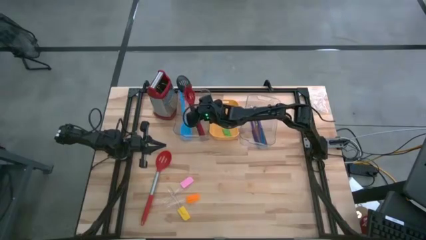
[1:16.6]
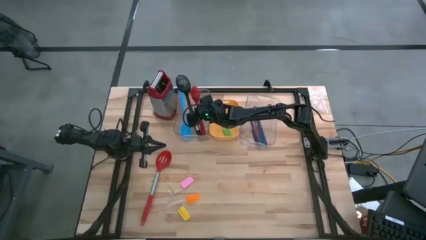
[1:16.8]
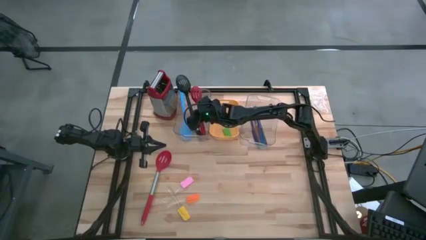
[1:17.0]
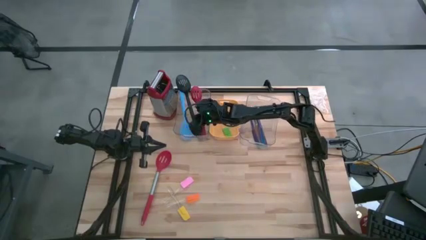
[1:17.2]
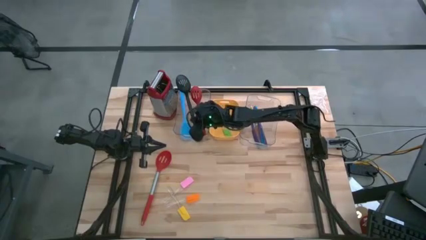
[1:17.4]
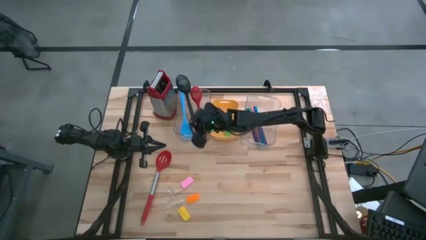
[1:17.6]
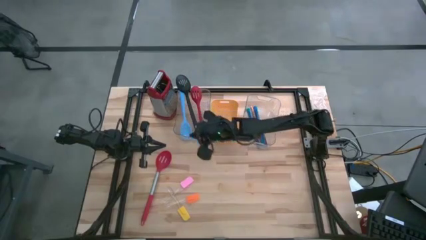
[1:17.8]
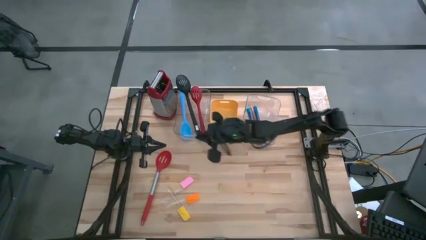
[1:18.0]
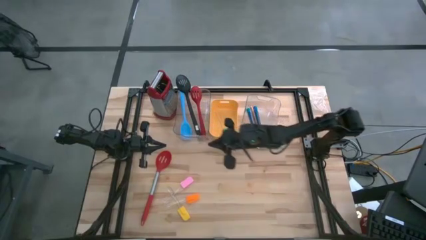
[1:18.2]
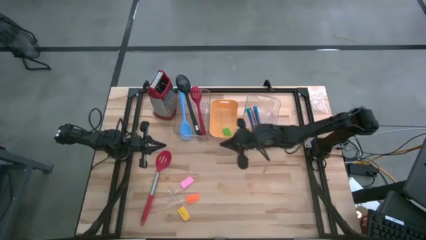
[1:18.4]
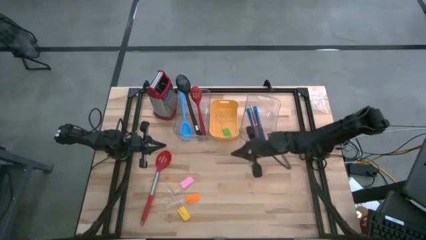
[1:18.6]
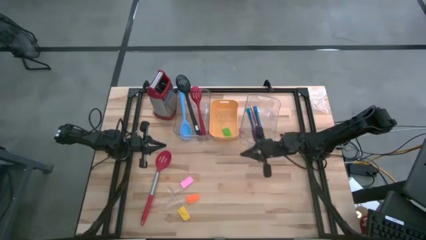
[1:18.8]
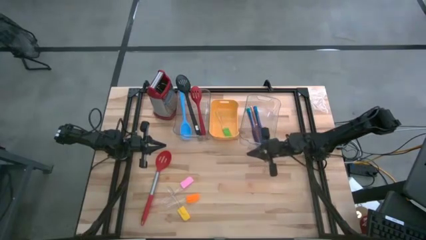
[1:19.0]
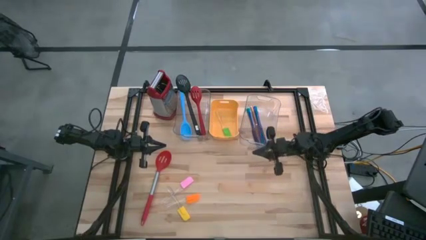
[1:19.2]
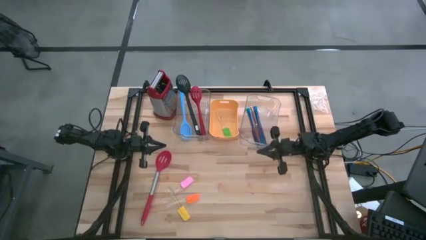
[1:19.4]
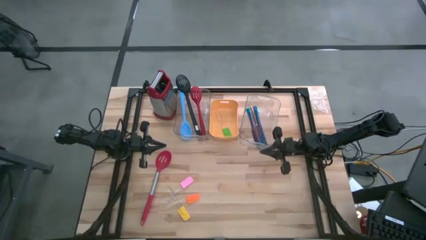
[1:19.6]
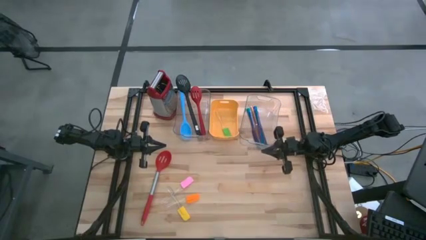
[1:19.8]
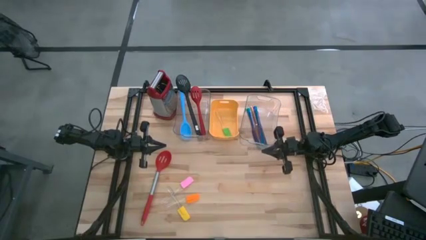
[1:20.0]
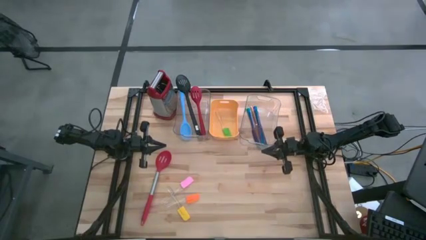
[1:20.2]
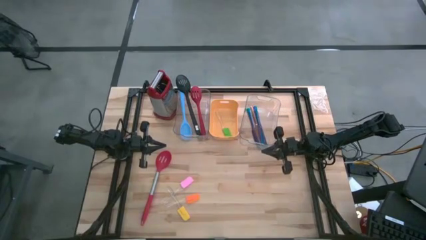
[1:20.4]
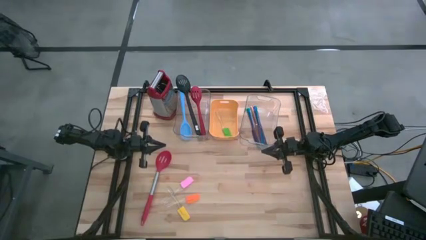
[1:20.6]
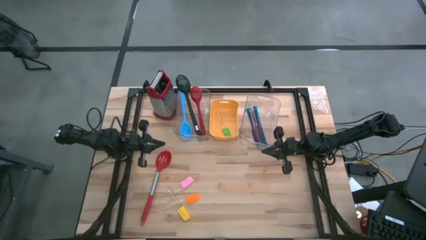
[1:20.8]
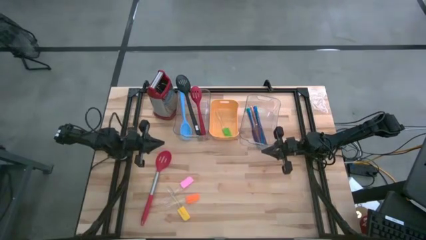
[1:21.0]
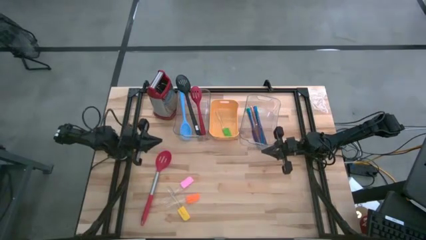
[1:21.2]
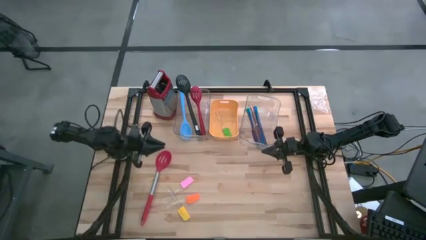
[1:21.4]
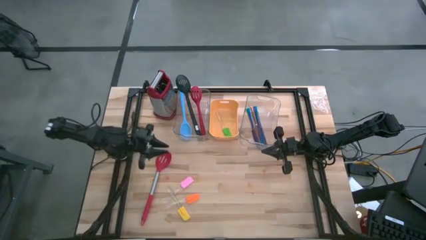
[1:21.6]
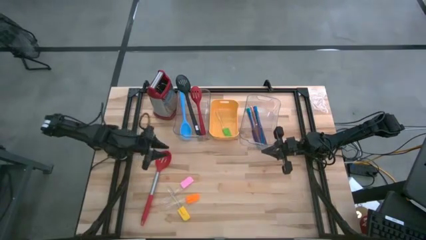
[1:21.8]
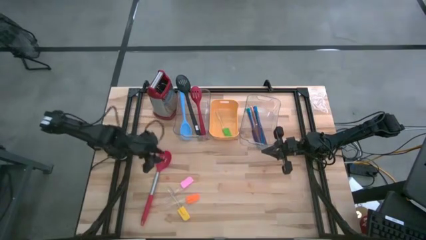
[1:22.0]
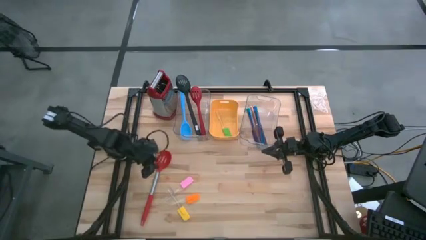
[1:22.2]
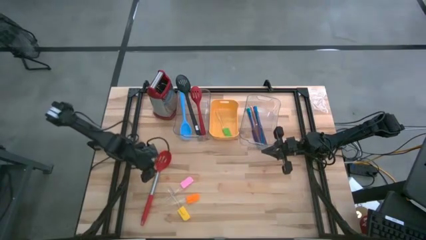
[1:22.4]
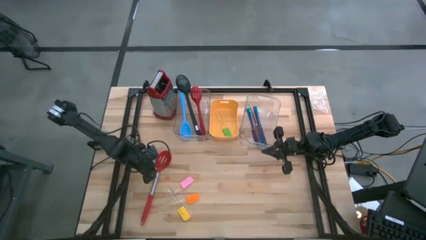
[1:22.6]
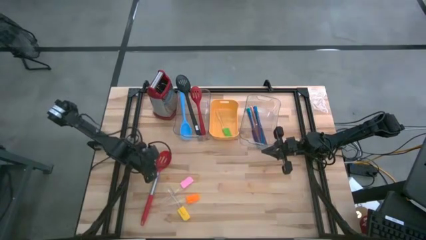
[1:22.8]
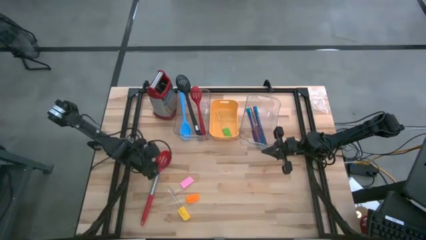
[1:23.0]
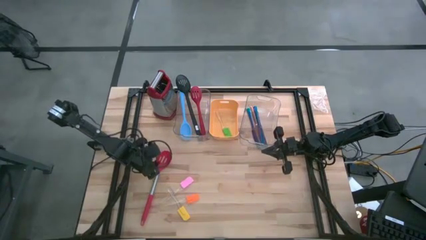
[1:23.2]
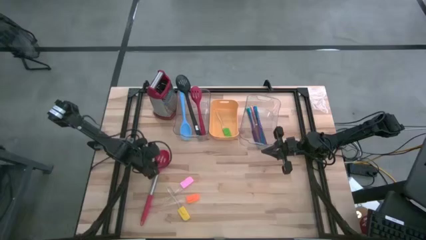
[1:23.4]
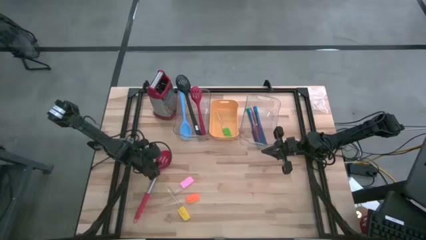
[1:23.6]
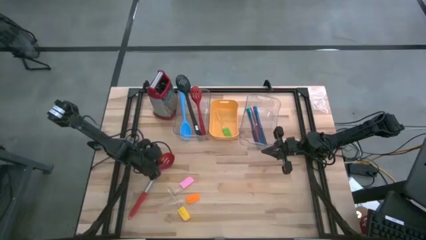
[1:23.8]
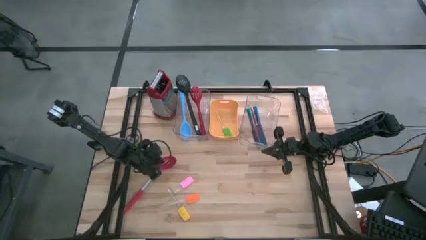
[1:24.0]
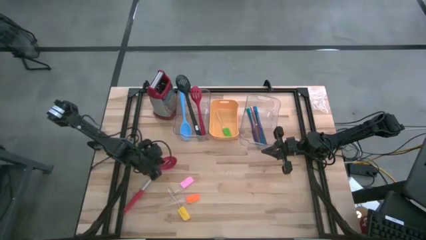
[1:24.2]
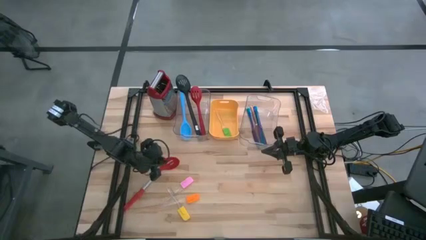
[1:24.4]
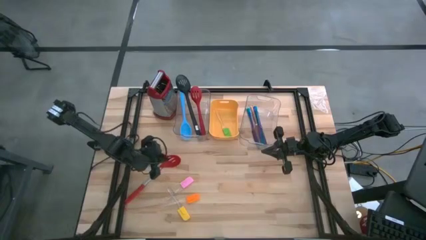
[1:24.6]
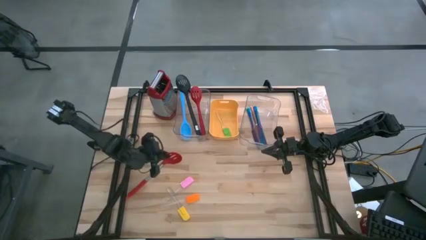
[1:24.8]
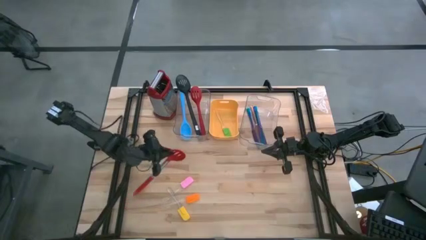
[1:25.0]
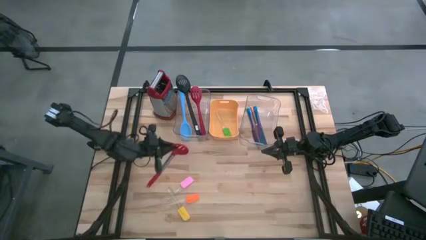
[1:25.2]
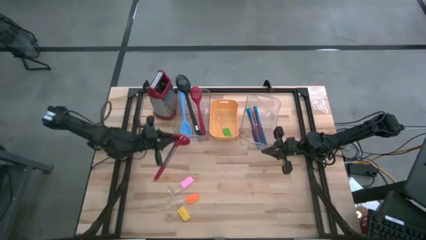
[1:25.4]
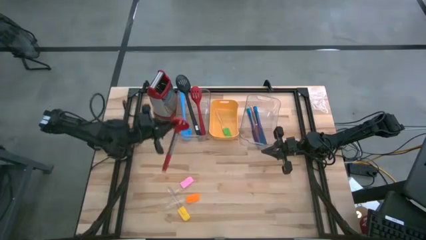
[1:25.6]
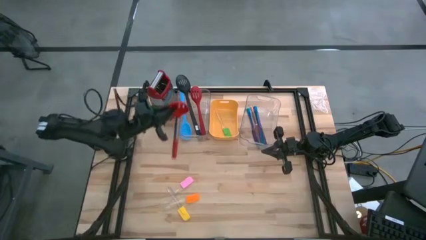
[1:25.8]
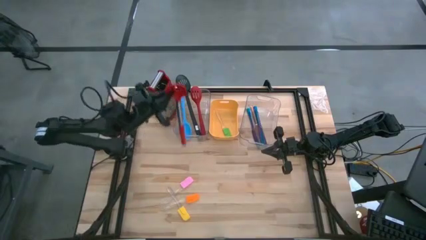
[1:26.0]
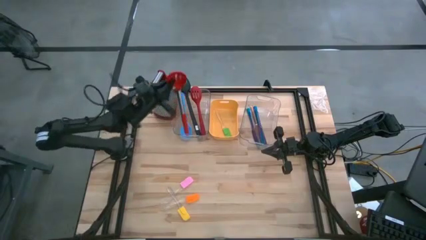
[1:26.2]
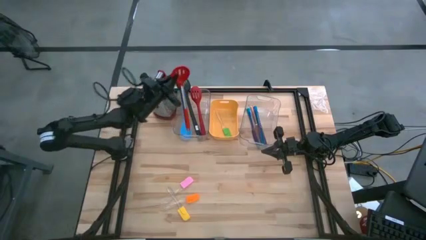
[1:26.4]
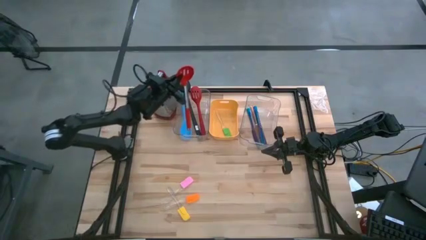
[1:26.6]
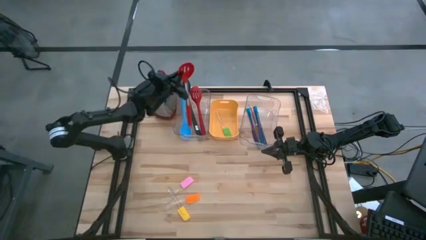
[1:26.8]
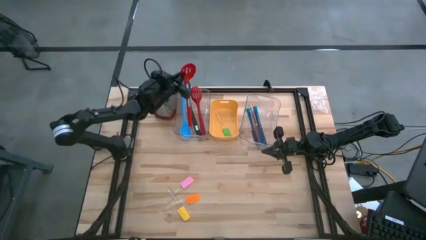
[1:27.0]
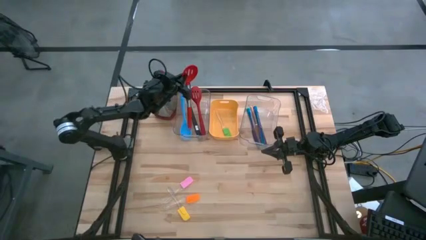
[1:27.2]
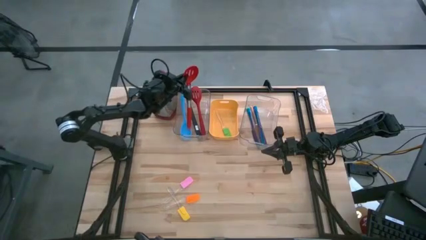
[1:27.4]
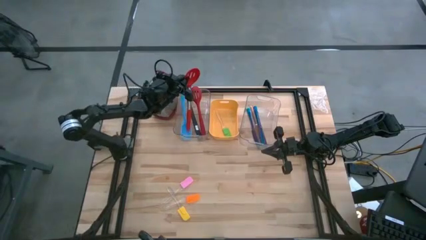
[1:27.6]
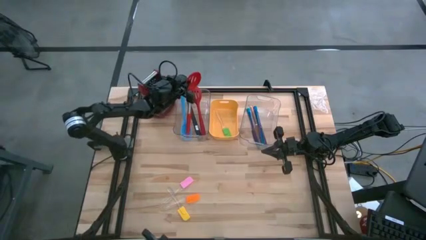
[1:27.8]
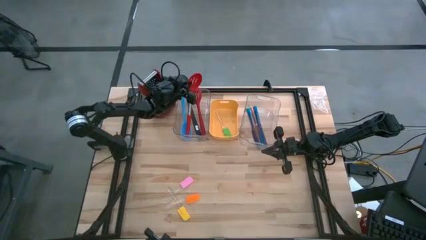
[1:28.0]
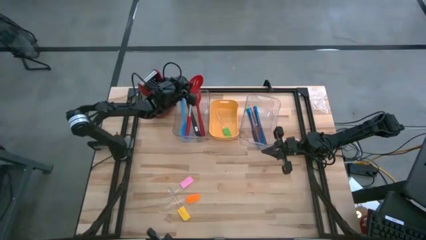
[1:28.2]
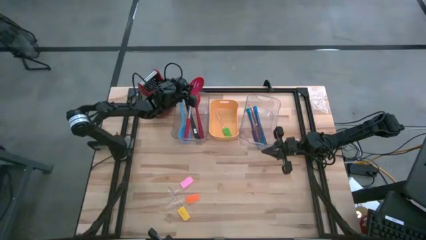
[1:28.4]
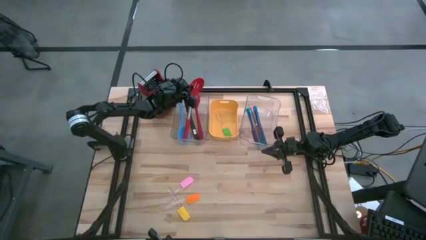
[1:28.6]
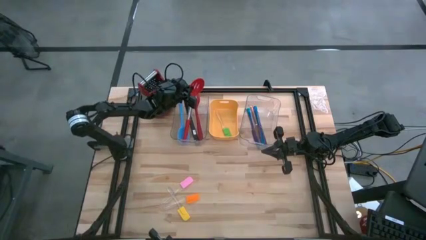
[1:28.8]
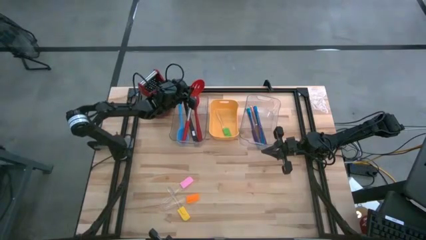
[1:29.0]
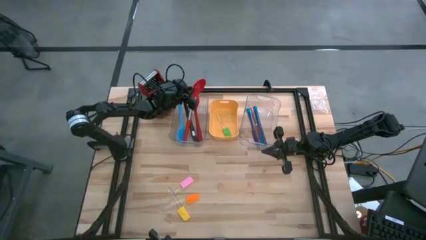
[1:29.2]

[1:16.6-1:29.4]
Task: Pick & Place Kitchen Items
Put the red and silver spoon into the left transparent bin

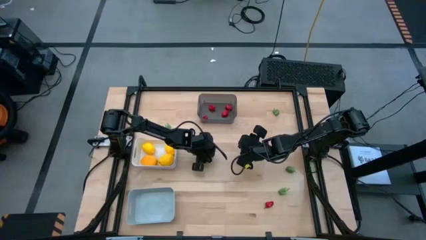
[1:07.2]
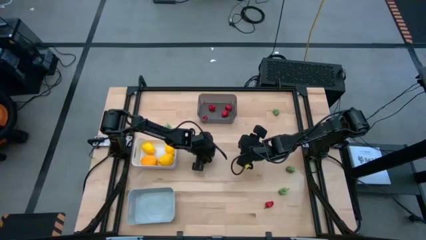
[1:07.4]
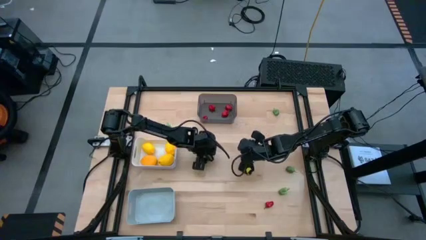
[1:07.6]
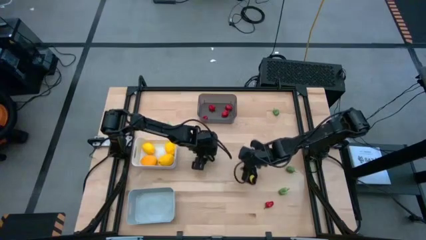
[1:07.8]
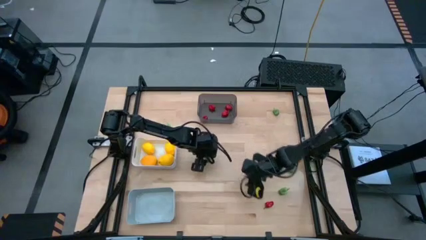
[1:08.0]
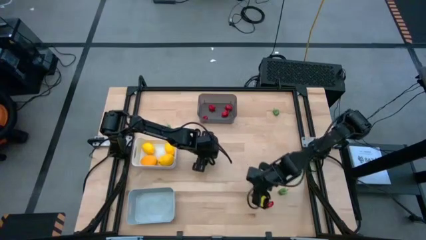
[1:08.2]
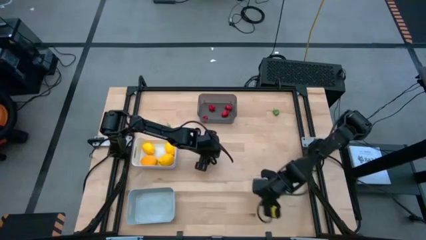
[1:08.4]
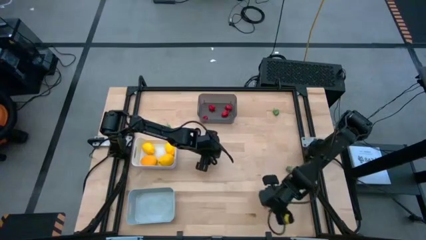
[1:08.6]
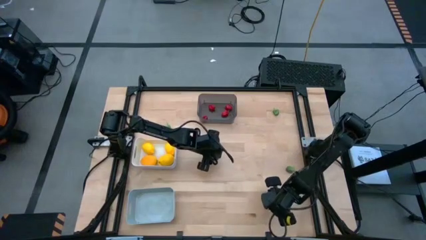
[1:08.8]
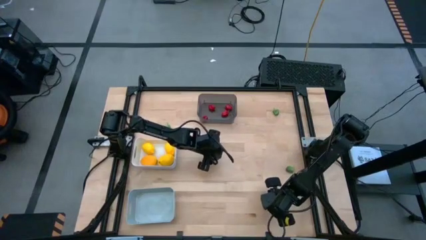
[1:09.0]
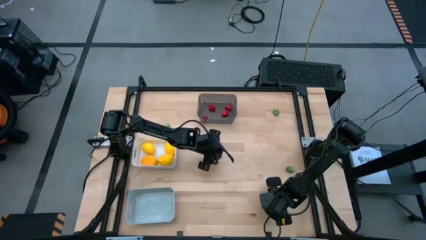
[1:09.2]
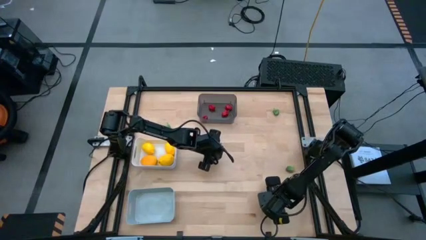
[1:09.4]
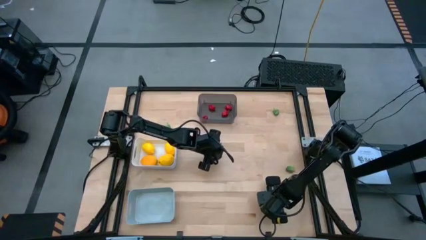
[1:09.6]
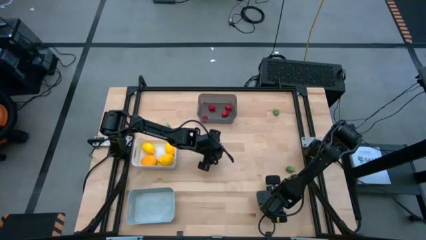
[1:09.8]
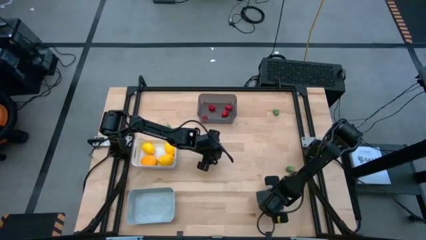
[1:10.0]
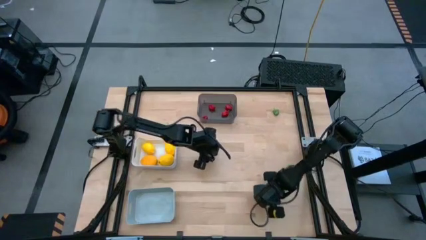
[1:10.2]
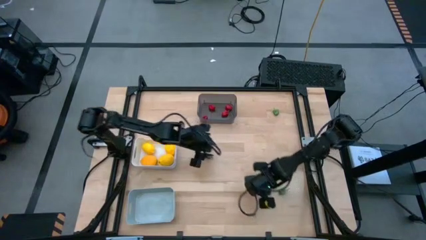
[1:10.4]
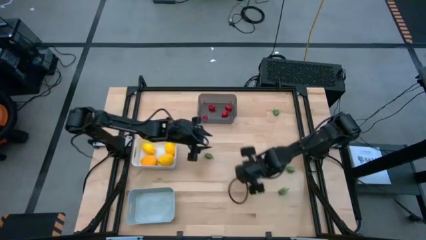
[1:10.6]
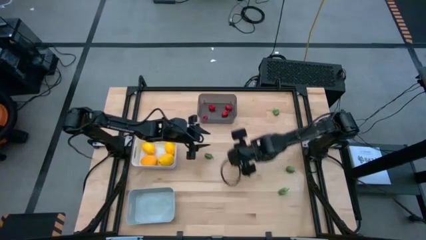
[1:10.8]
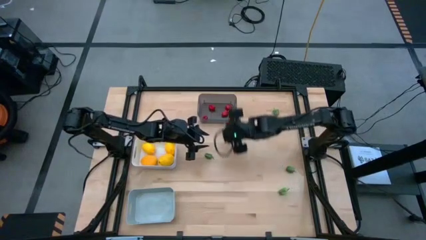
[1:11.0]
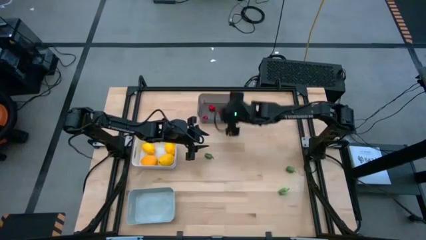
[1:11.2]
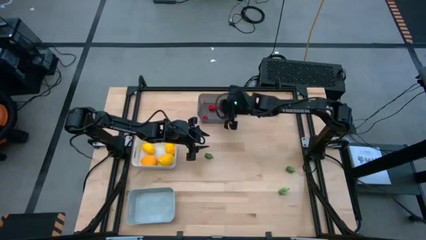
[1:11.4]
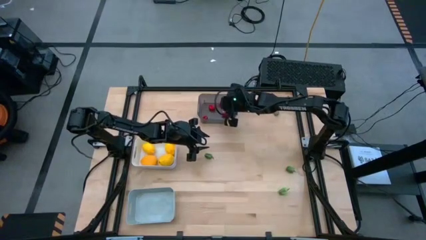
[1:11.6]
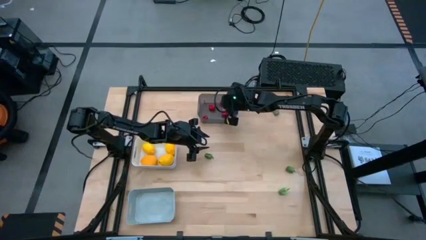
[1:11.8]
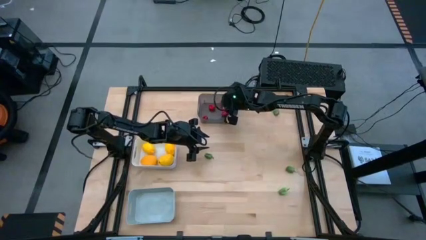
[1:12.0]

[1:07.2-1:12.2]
Task: Sort produce into baskets
Put the red chili pepper into the black transparent bin
